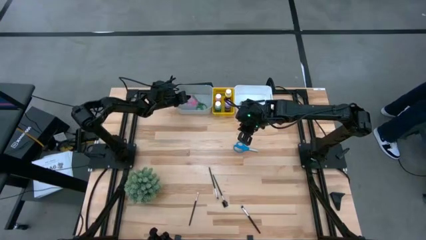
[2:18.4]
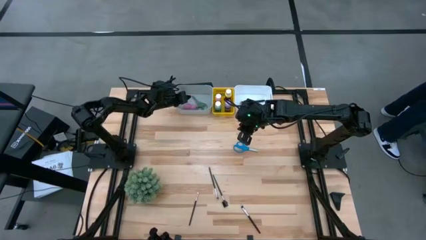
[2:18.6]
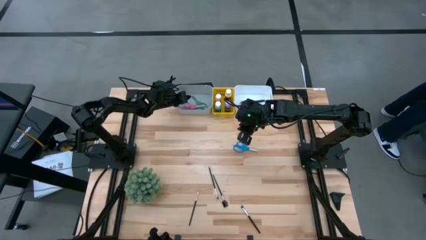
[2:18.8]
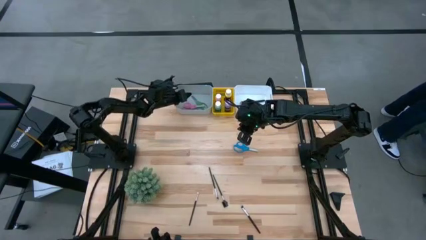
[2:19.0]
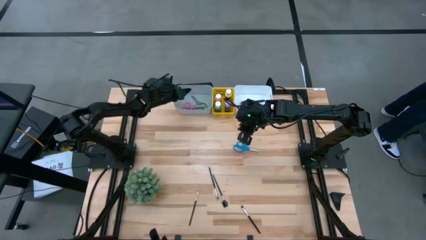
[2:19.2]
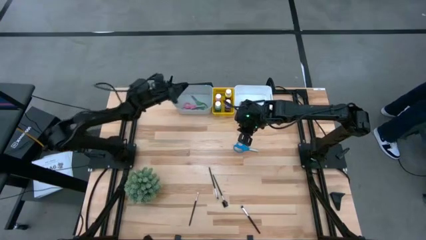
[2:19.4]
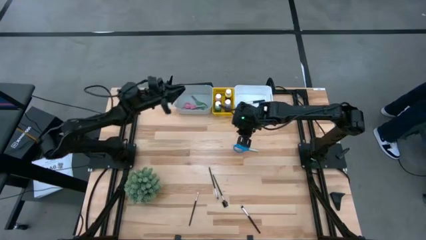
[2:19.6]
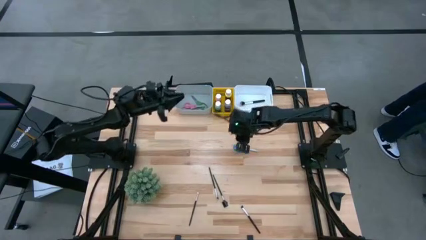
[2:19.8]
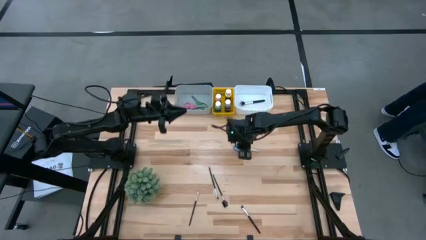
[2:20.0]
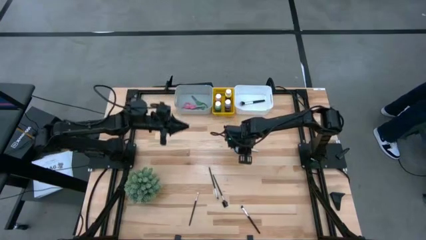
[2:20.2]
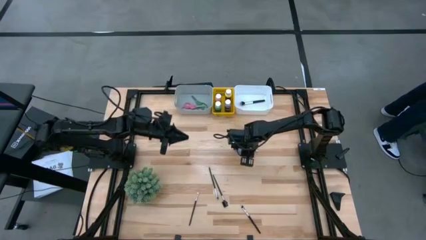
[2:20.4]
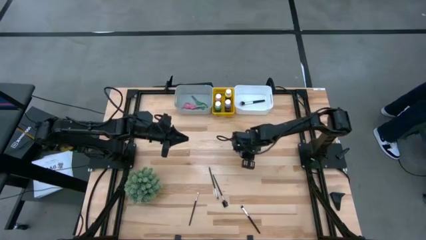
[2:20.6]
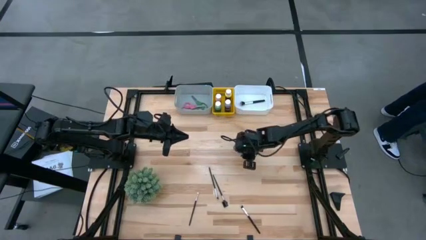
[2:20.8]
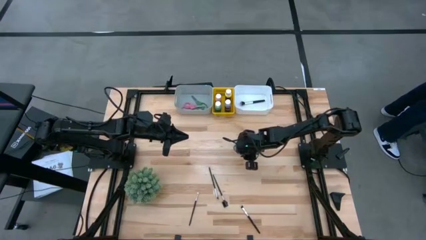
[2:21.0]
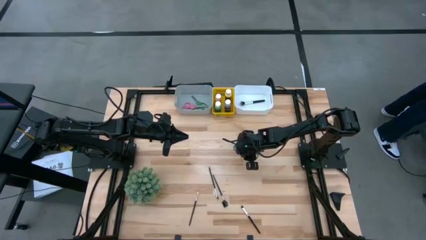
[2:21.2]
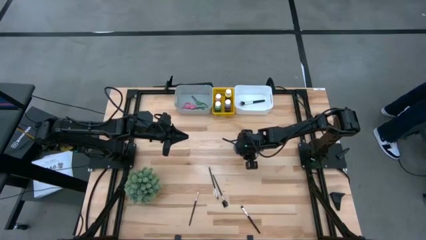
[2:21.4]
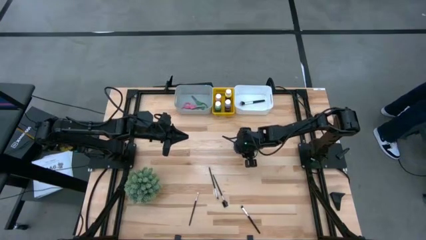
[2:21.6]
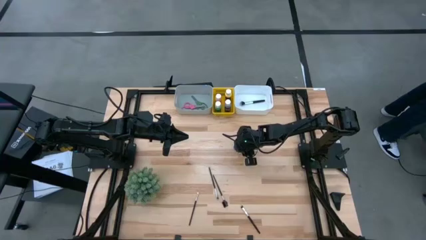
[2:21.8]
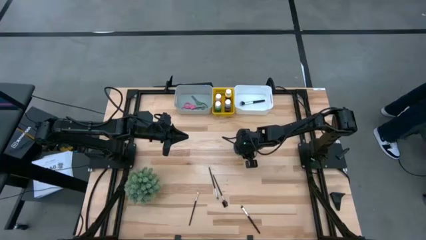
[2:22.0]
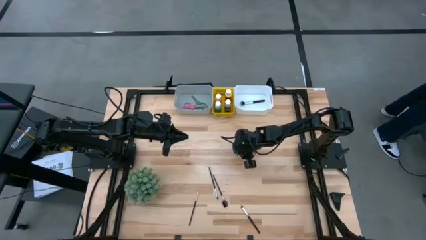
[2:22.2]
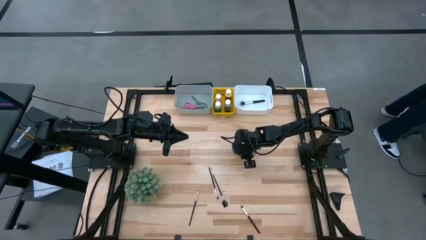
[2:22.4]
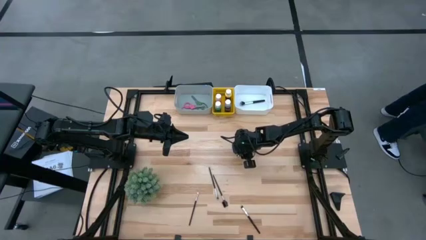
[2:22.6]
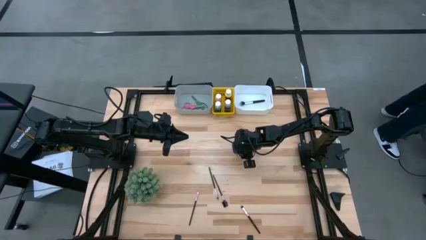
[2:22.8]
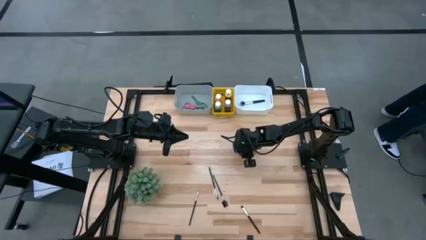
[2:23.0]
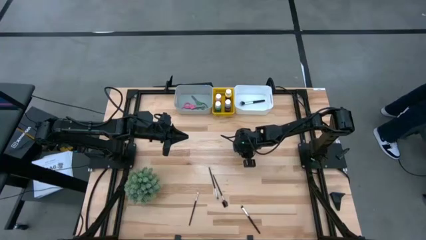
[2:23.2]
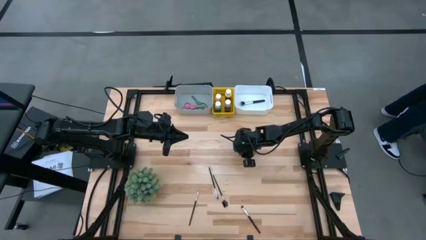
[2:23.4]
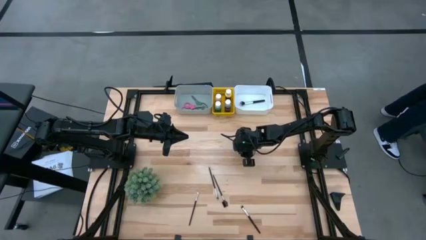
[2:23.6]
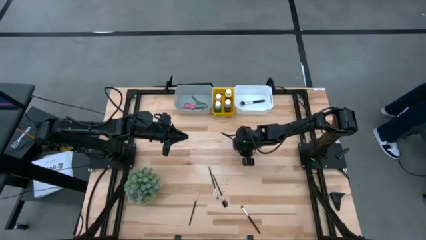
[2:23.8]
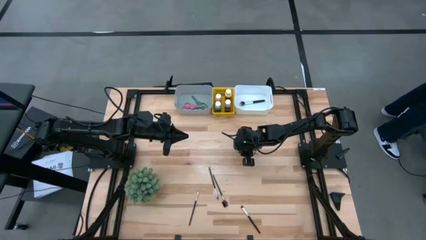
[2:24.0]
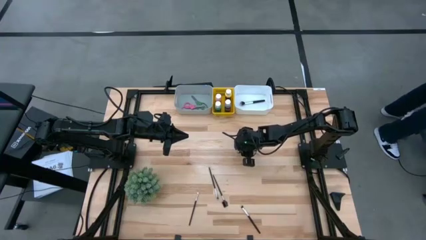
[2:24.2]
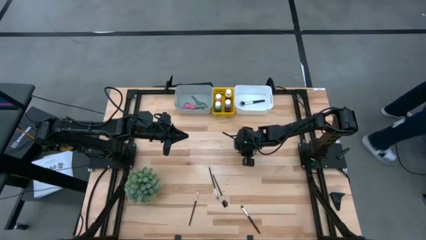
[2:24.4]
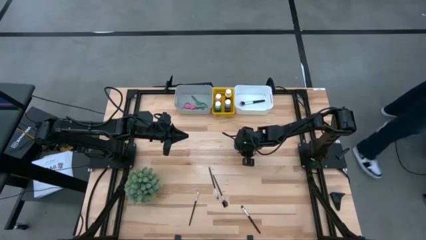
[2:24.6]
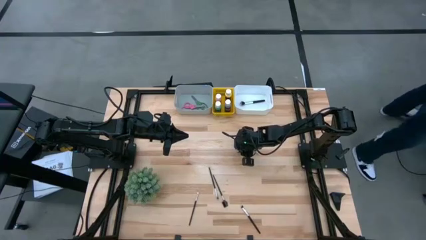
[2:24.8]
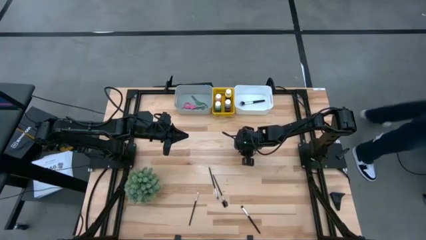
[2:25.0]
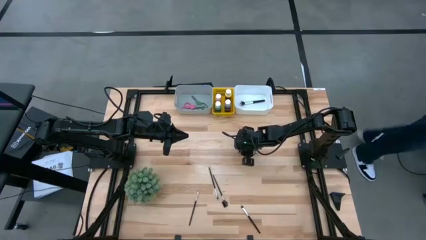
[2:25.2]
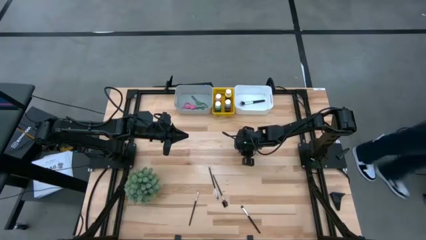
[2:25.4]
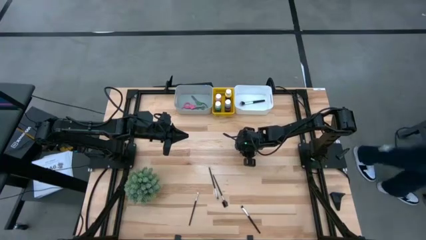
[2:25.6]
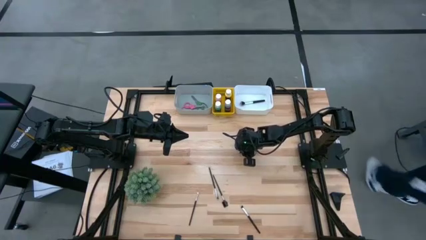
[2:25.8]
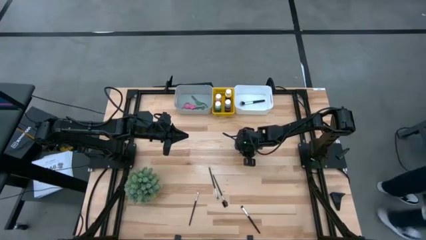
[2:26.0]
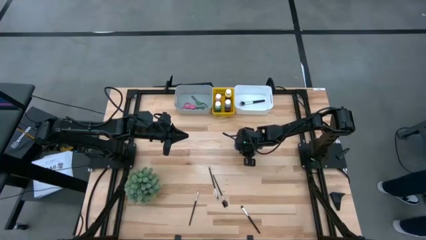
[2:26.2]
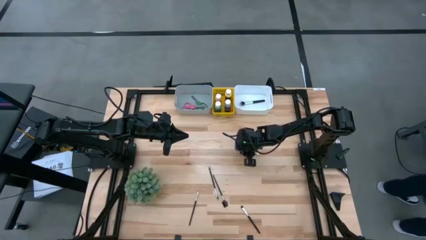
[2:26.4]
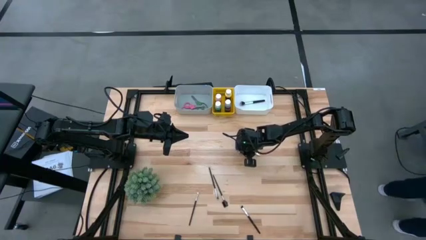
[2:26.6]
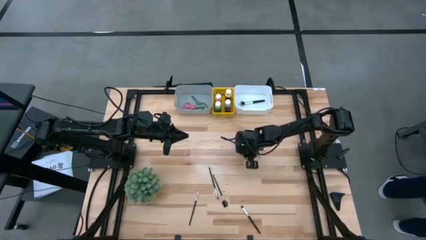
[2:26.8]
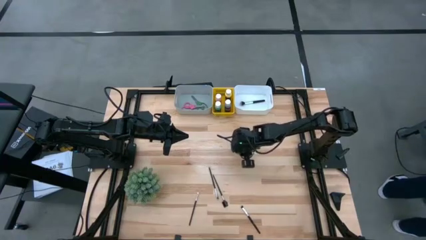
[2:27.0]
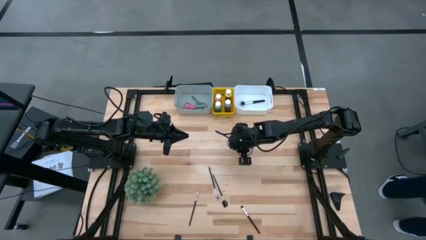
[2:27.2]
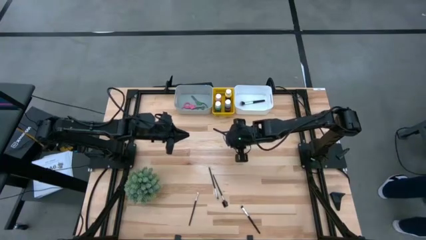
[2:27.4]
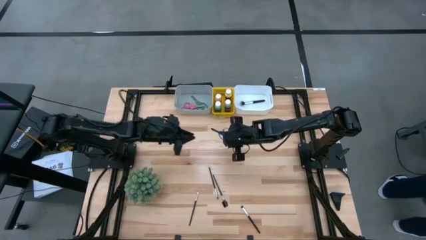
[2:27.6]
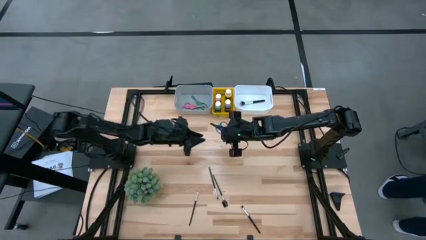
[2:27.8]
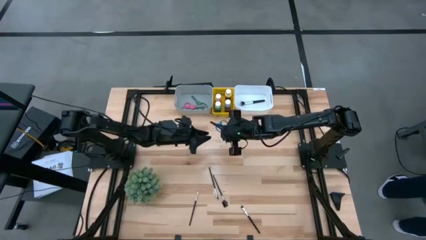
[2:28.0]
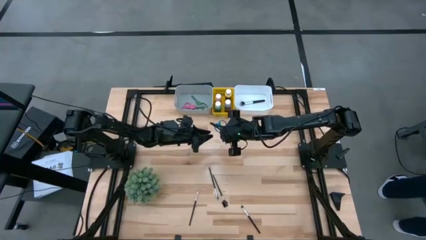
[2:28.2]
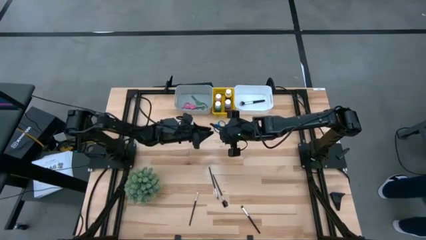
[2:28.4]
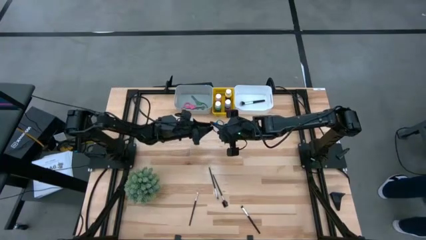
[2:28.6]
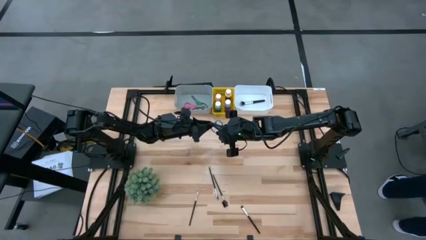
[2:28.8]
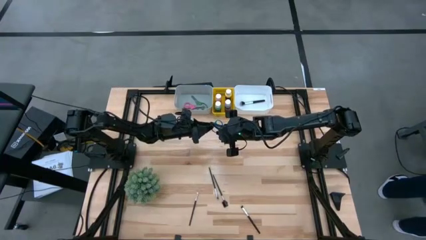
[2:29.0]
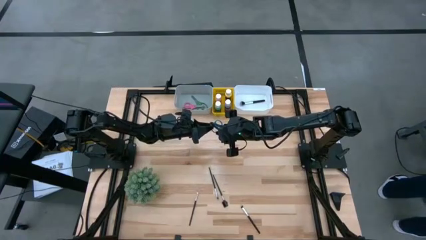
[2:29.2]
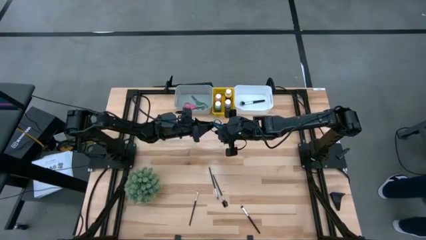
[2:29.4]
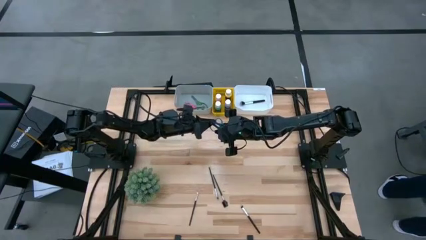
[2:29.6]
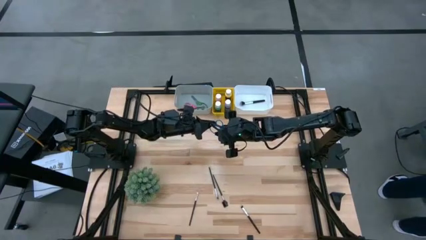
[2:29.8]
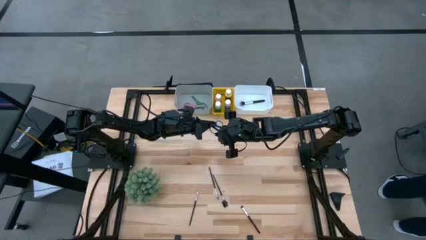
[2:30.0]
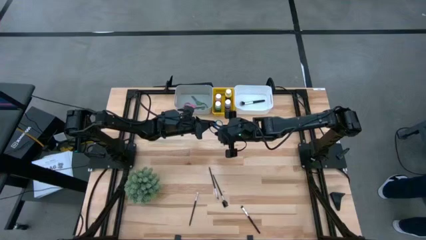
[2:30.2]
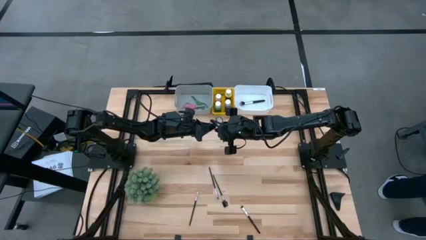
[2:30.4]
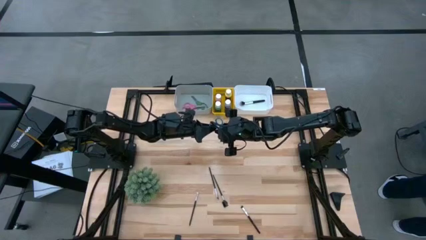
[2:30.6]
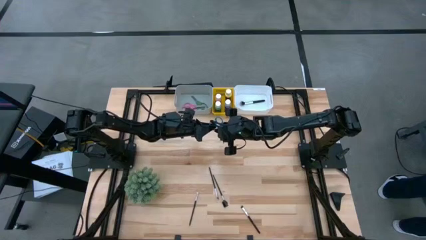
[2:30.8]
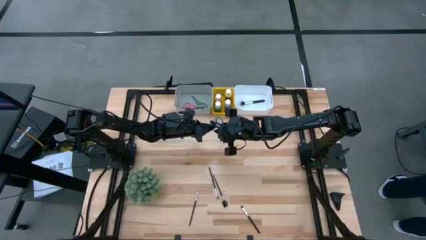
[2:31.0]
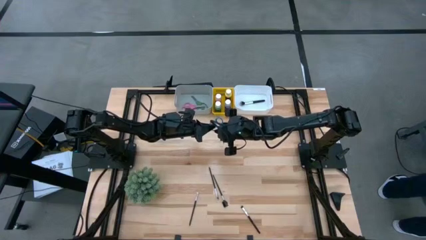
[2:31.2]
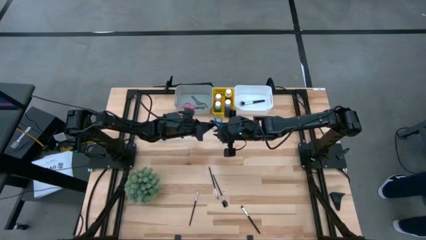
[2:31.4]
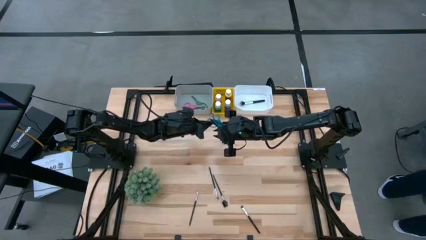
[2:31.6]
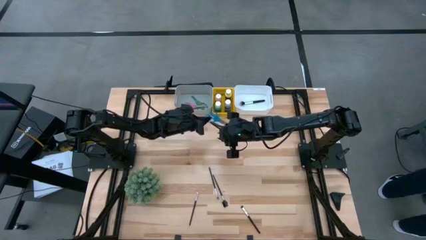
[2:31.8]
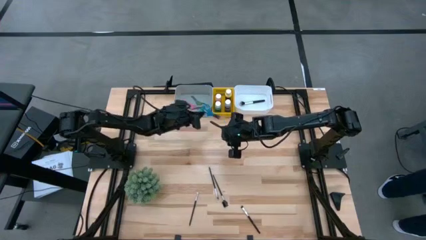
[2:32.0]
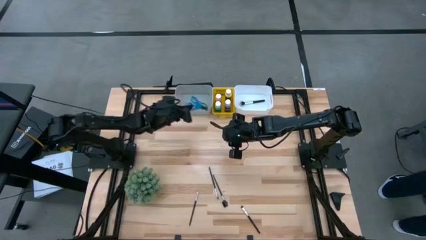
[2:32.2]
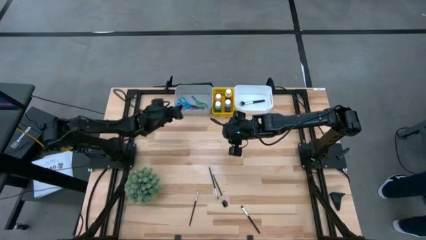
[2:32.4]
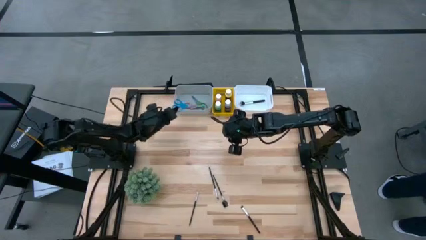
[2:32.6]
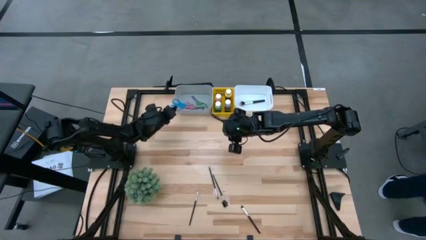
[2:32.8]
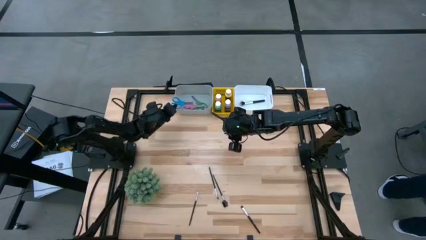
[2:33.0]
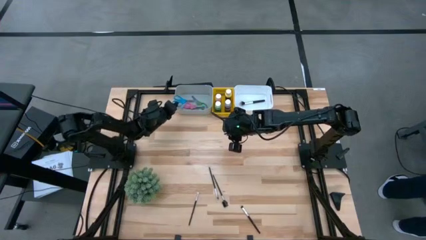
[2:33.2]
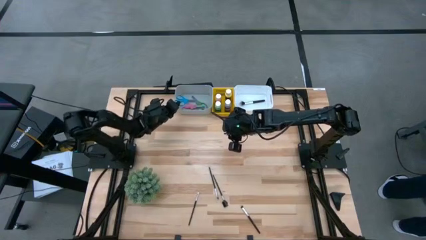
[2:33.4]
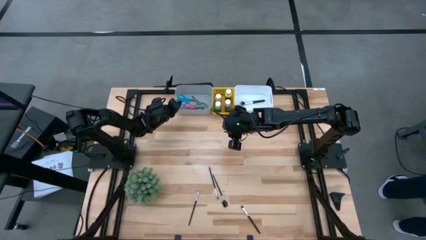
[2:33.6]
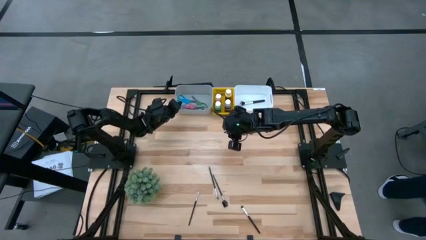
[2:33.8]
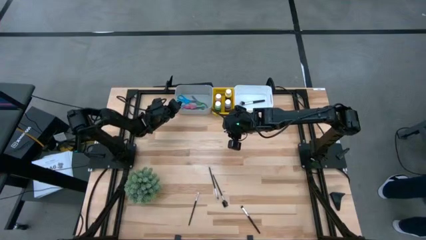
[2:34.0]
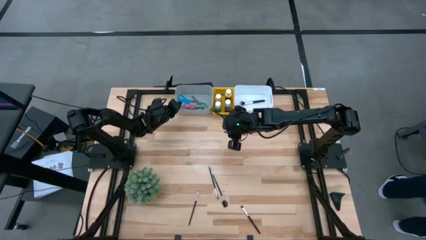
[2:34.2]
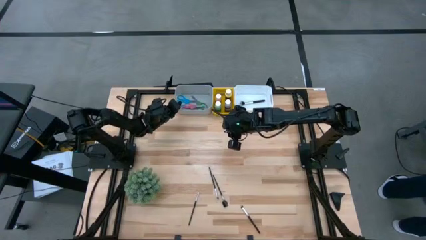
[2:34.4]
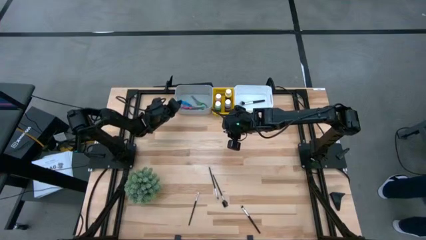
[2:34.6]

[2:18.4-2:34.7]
Task: Pick & Place Paint Supplies
Put the blue scissors into the gray bin

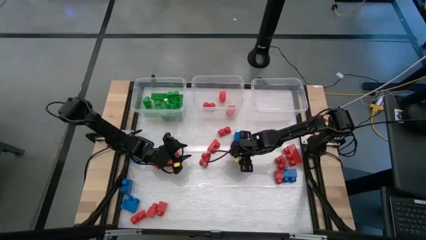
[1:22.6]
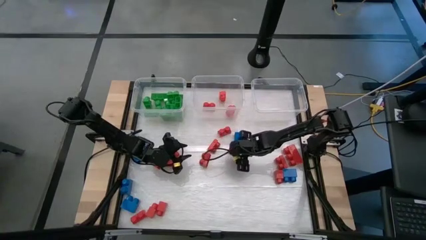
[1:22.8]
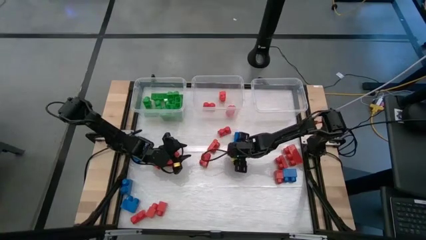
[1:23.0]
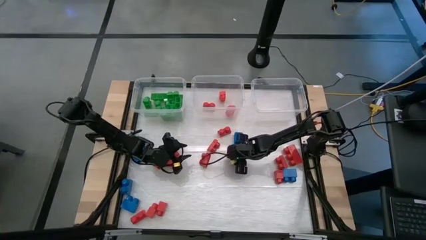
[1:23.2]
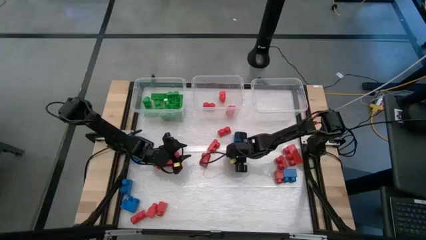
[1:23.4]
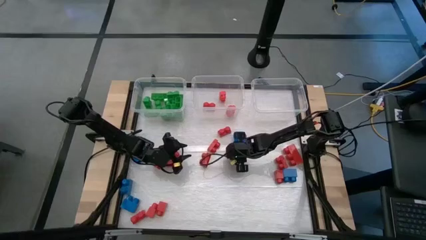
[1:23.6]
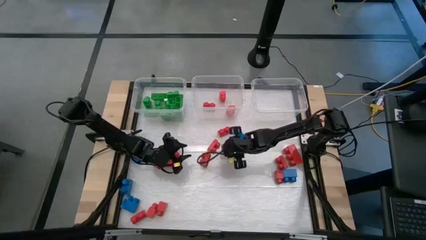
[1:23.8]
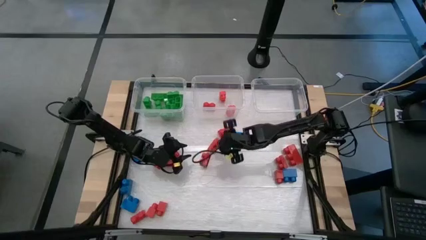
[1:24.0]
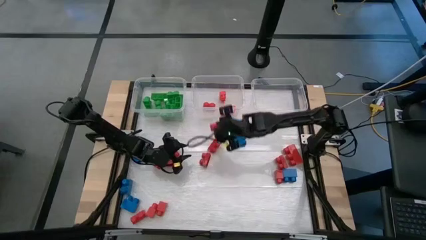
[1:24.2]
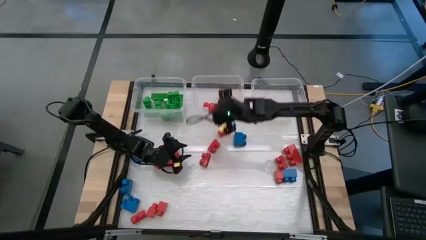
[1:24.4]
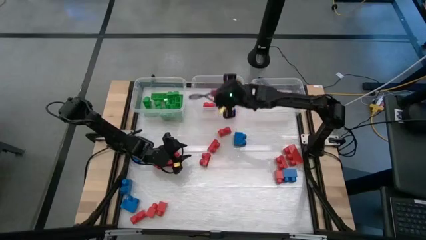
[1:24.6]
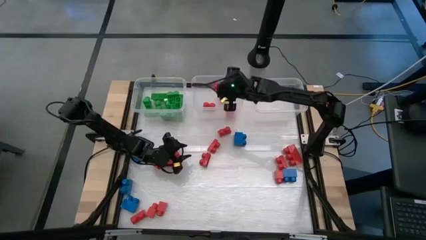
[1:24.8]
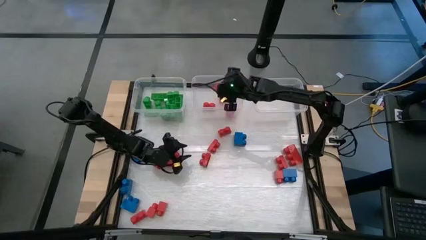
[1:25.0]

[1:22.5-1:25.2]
Task: Sort blocks
Put the red game piece into the middle transparent bin
